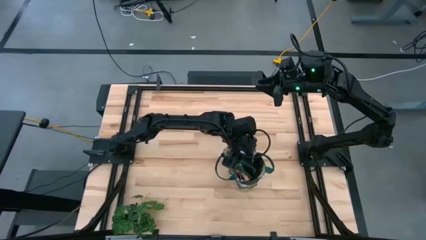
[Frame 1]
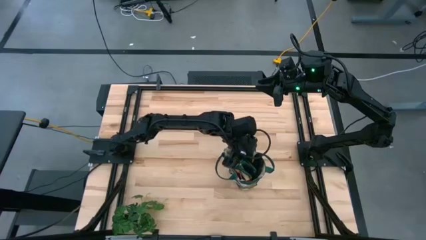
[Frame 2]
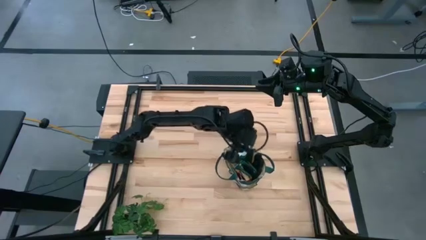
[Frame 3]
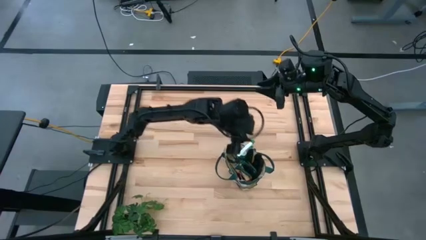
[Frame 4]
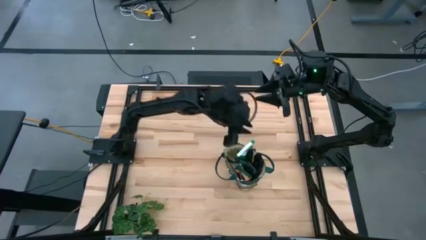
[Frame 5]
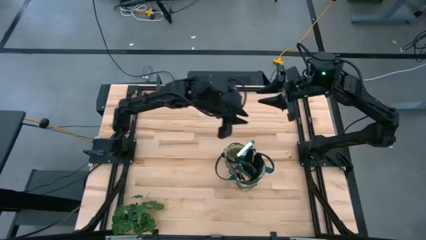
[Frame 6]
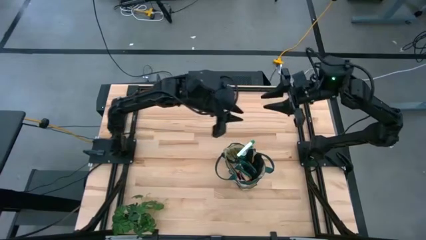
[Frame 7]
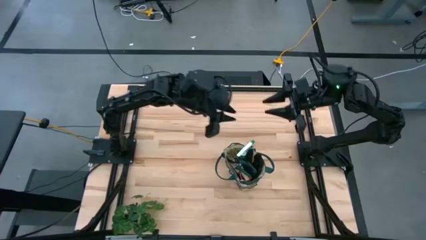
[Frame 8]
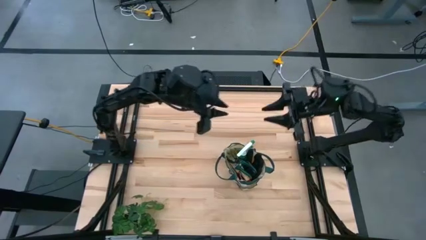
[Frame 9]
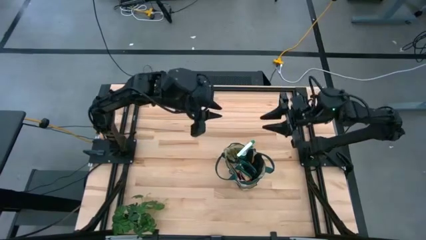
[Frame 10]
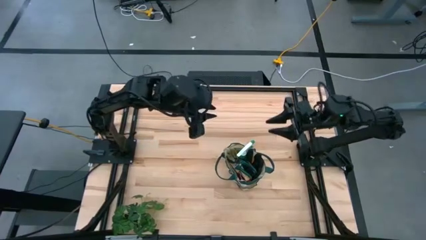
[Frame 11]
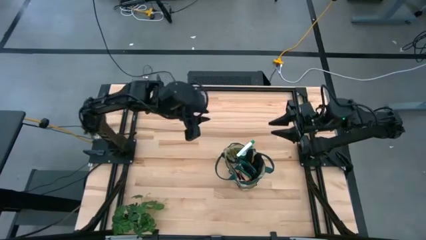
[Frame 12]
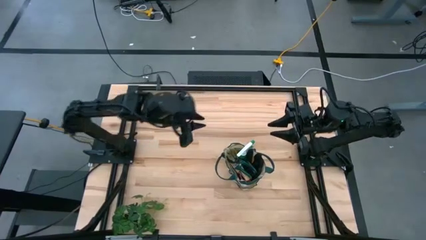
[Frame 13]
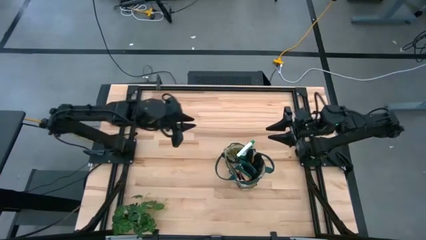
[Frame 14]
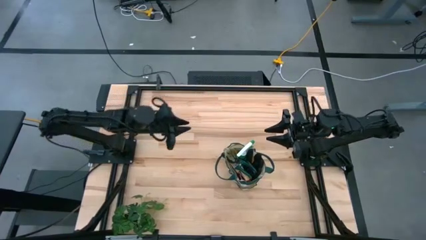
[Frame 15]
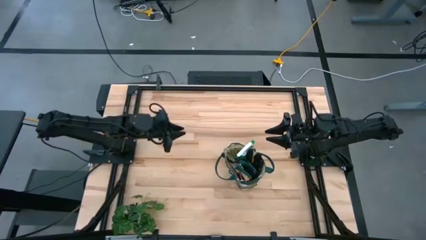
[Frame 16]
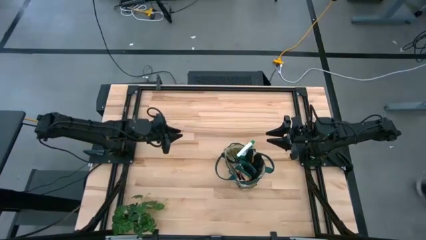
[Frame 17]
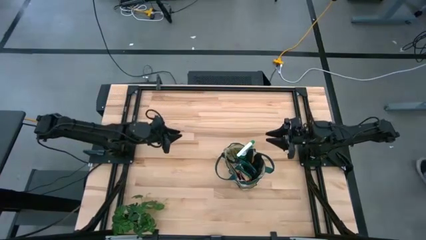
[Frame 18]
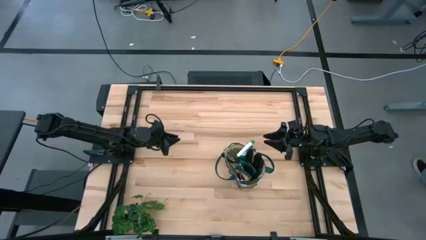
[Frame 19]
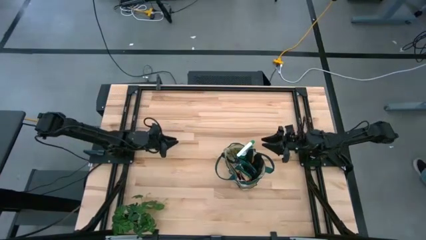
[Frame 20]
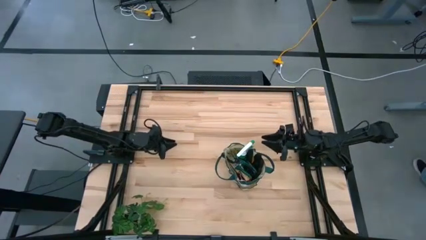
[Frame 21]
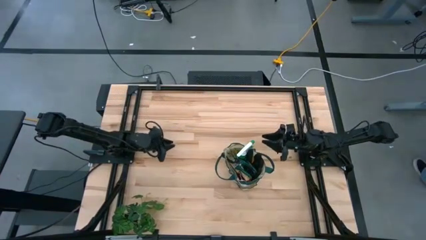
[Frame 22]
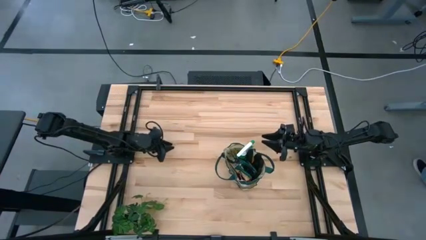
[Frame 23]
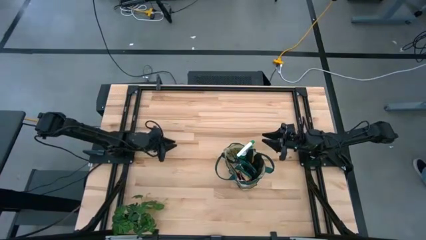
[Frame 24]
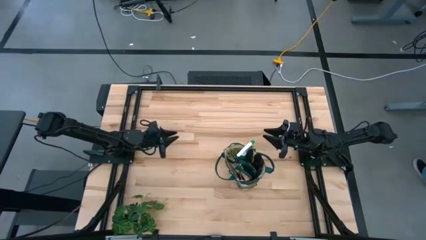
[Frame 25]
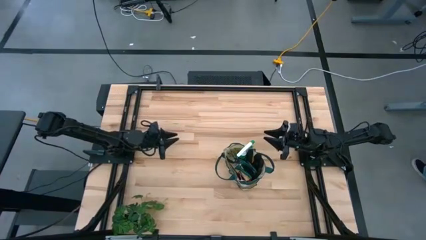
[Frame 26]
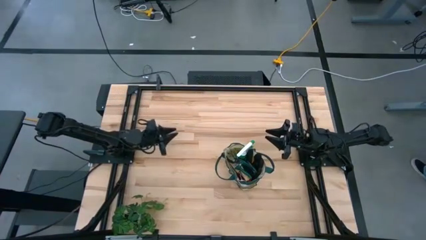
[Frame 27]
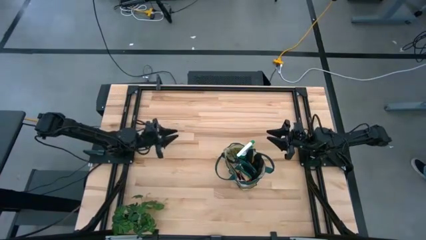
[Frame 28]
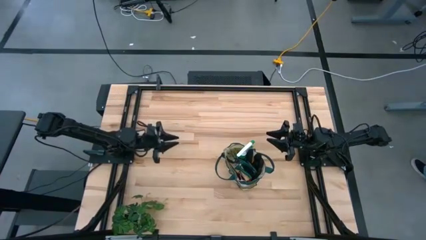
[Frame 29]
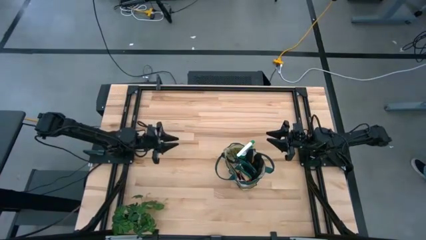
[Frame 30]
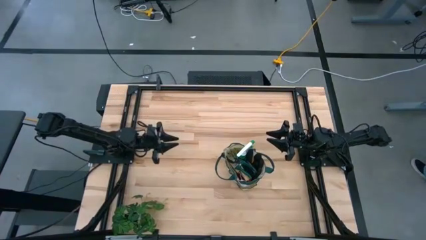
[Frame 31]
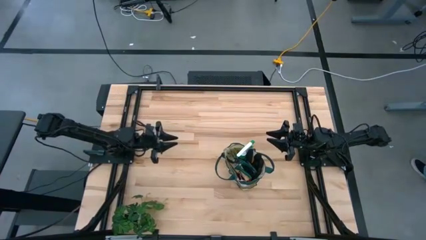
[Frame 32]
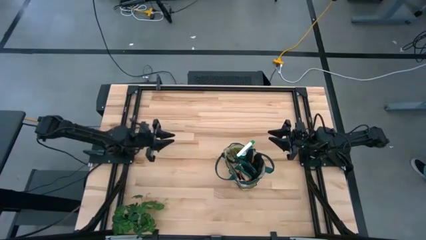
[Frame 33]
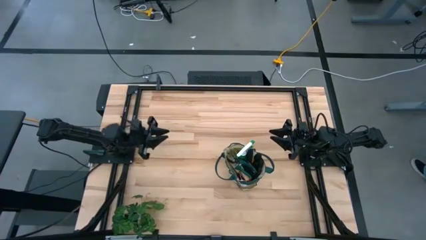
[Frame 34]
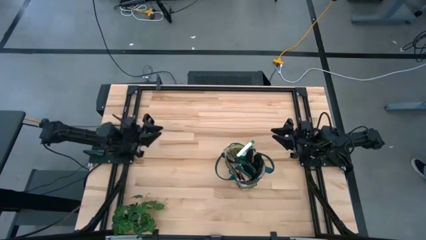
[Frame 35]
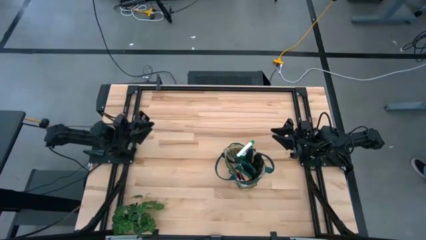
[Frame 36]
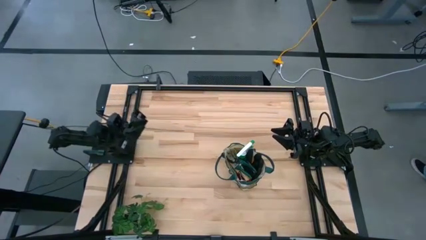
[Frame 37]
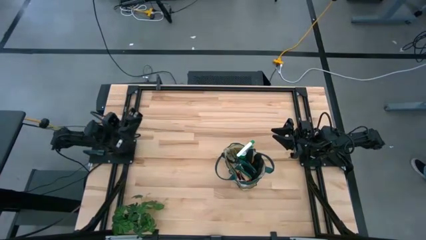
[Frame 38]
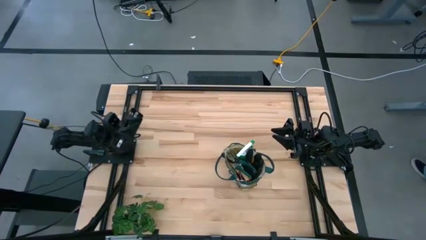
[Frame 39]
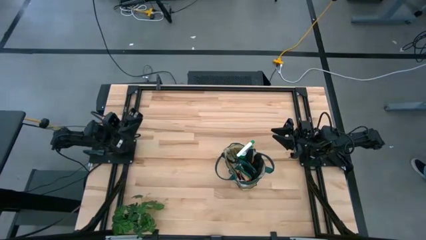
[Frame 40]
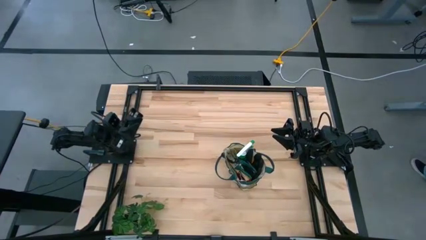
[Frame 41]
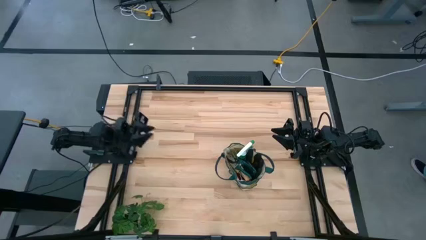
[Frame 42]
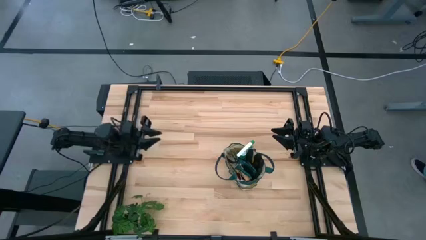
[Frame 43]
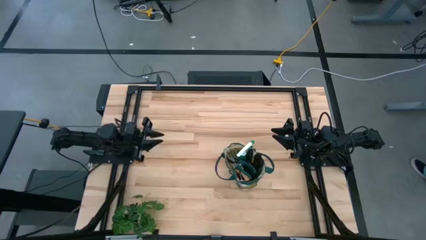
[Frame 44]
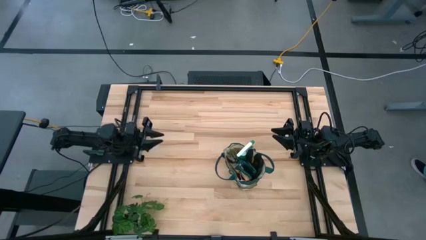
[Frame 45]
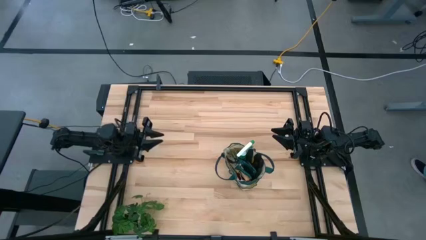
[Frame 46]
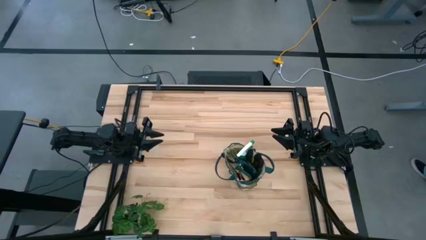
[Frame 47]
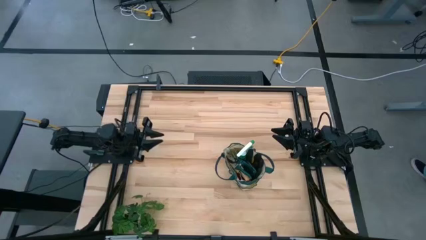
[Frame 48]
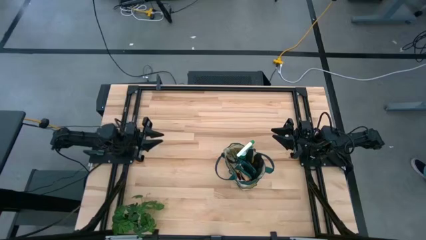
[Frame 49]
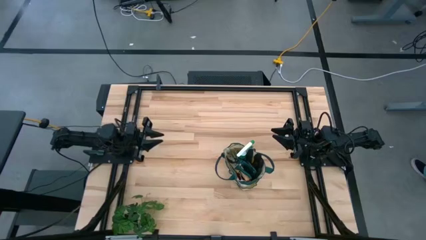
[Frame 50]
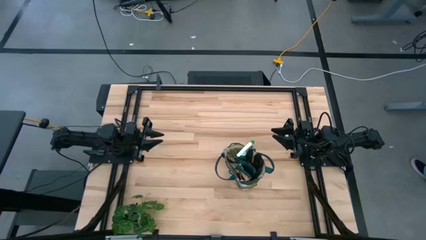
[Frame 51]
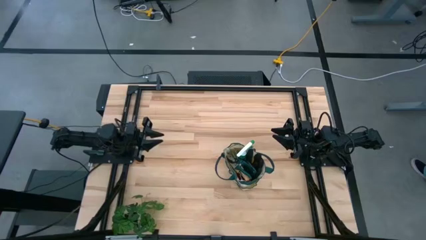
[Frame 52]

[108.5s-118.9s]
Task: Pick & Place Garden tools in Gardening bag
Return to Home Position

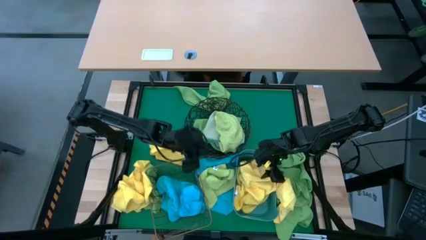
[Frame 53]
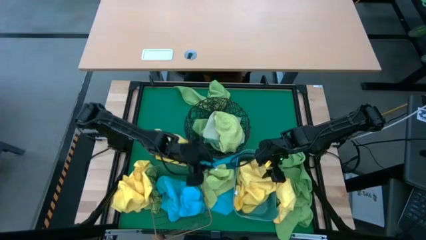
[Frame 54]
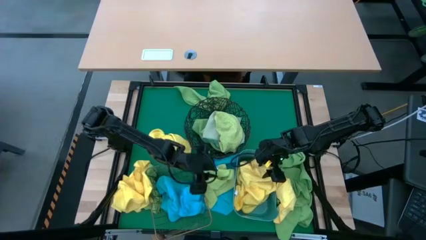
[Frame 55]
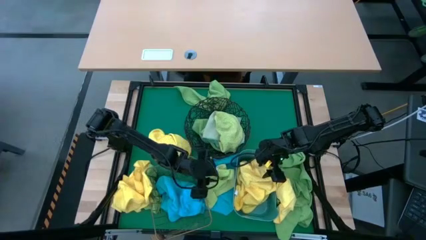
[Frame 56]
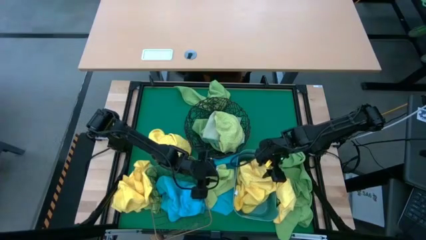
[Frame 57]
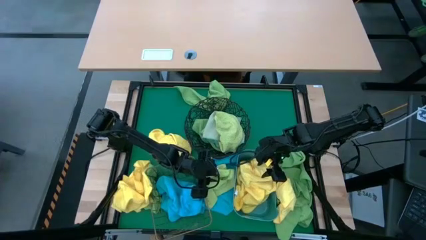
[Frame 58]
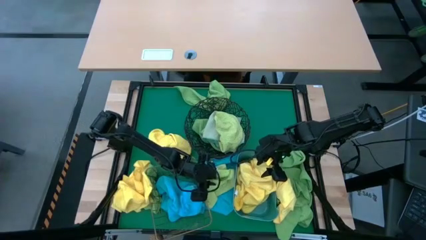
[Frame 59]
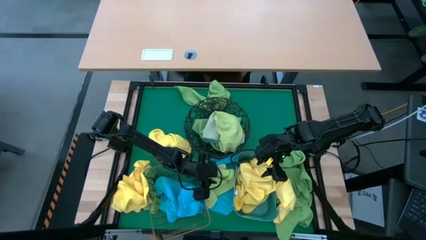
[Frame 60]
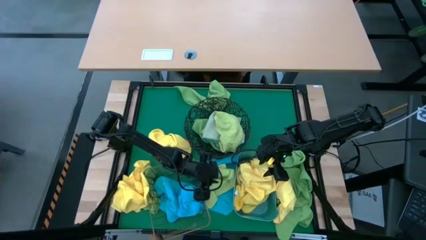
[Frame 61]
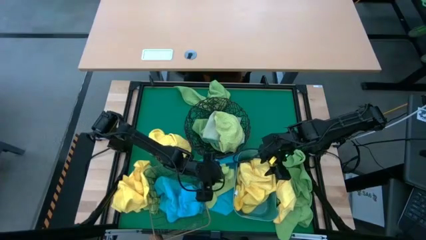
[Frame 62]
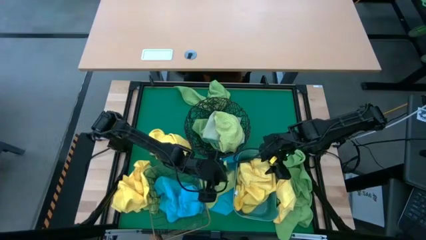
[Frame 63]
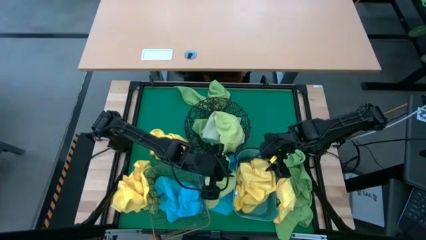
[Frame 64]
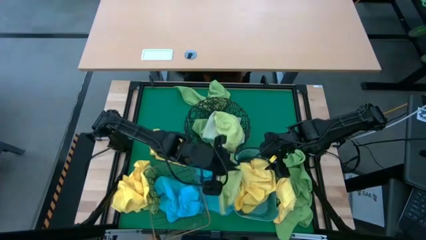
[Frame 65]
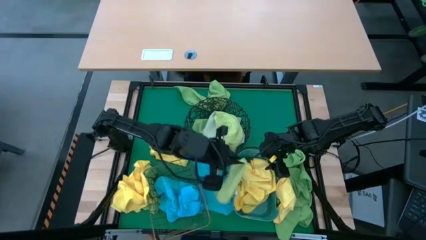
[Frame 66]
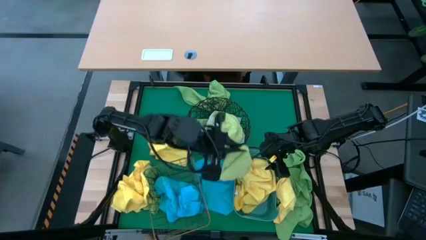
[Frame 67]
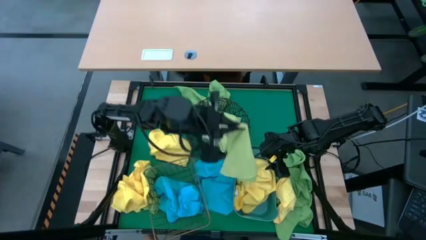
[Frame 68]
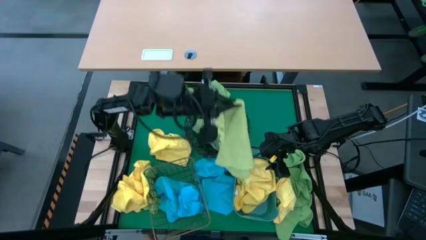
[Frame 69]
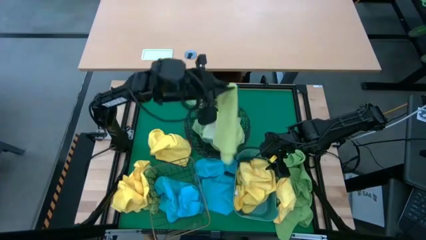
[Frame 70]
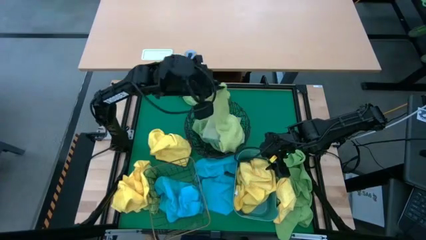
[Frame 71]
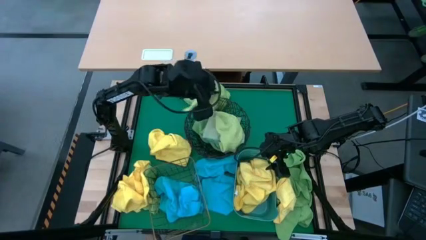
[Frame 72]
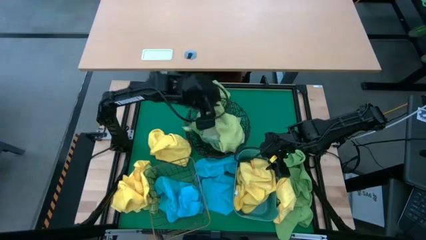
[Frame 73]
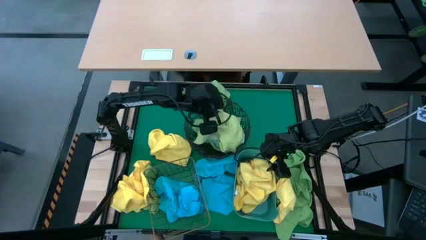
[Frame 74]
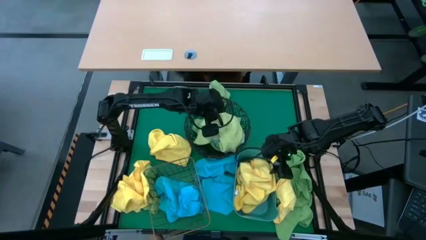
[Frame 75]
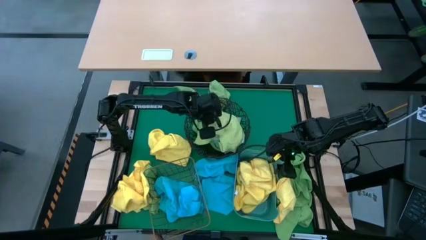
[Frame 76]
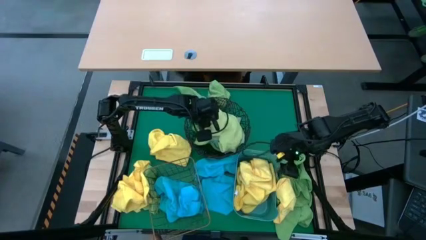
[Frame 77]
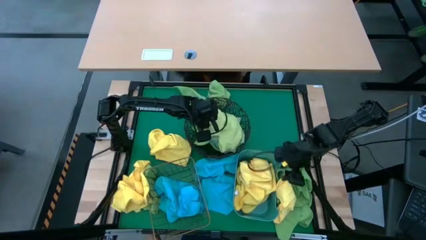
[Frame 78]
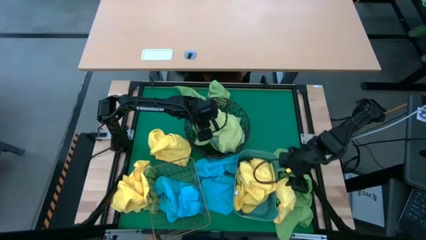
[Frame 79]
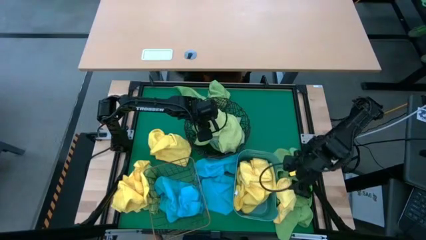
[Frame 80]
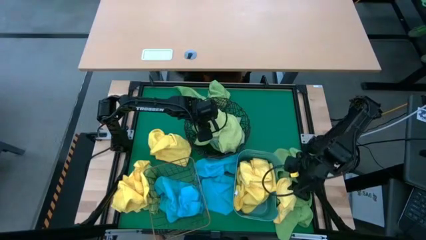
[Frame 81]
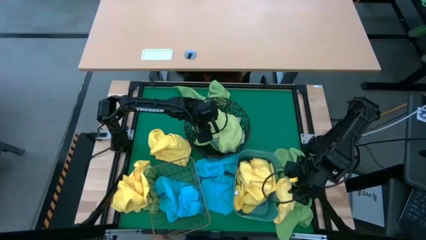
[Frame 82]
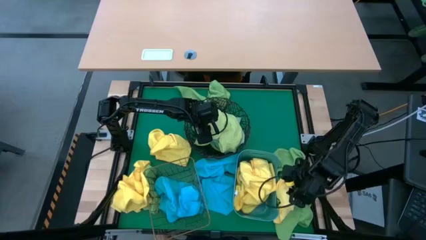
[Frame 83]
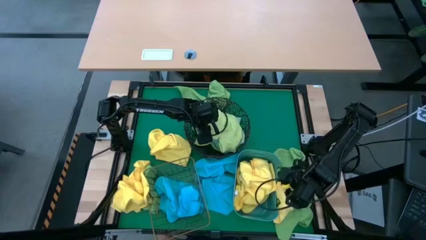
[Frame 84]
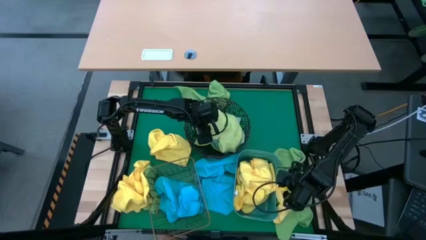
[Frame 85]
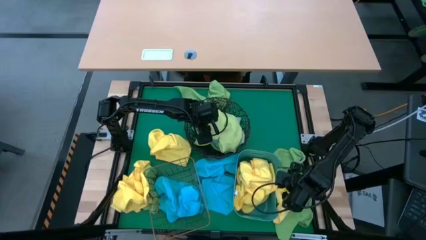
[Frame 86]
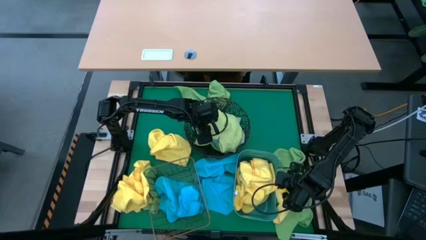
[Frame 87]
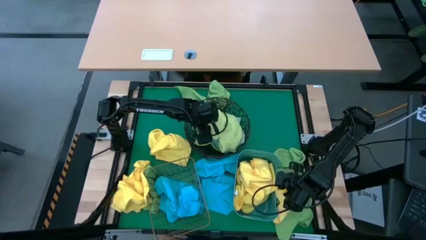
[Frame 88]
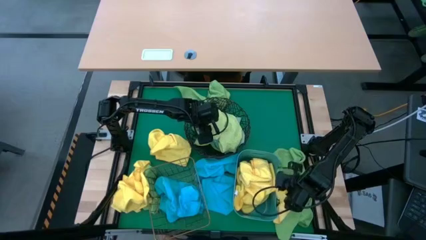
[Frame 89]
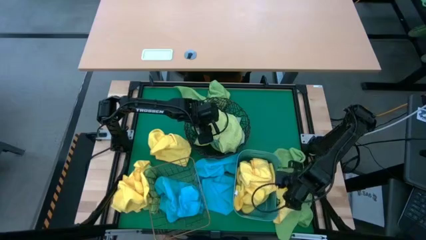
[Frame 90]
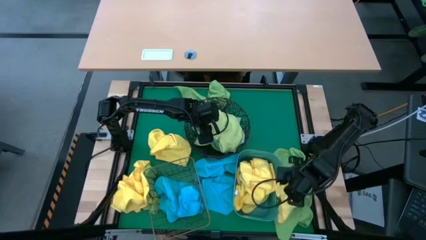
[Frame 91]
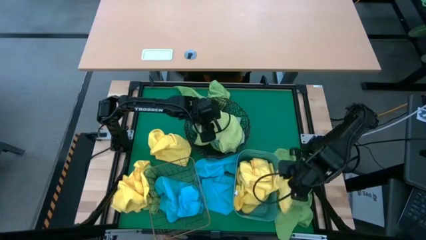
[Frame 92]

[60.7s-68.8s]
Task: Sort microfiber towel by color & place in baskets
Put the green microfiber cloth into the round wire basket
